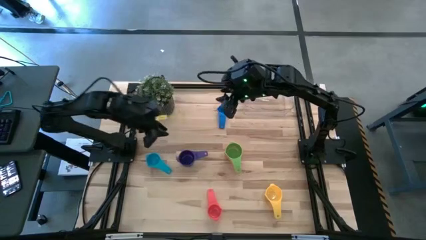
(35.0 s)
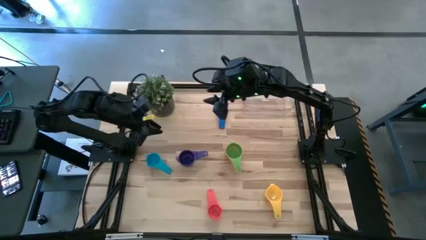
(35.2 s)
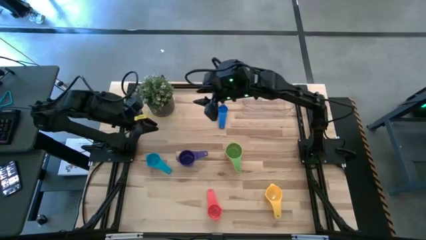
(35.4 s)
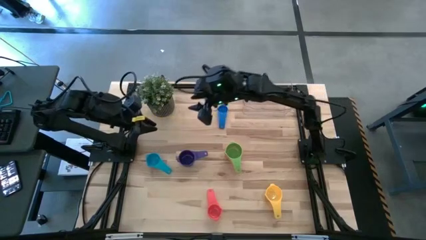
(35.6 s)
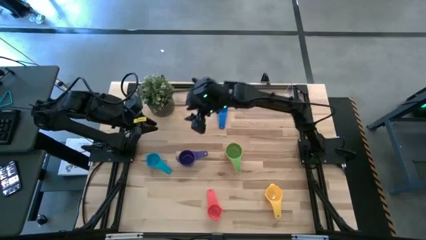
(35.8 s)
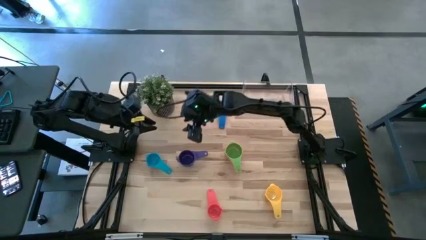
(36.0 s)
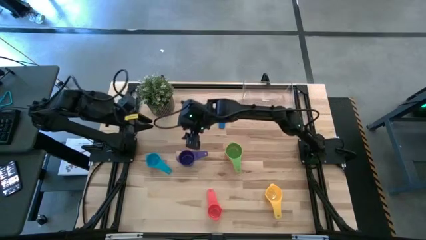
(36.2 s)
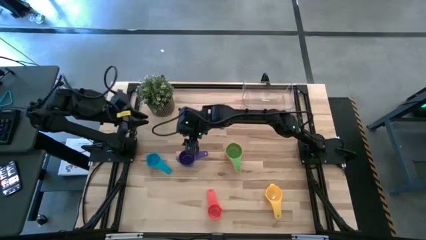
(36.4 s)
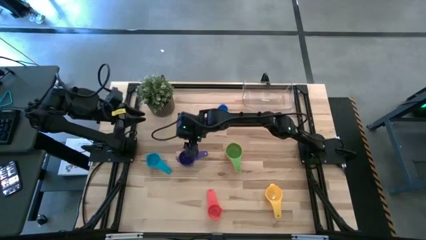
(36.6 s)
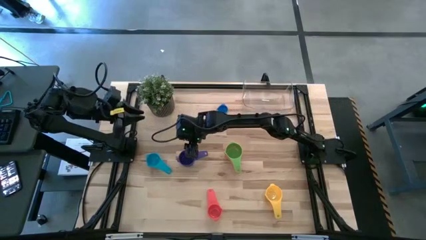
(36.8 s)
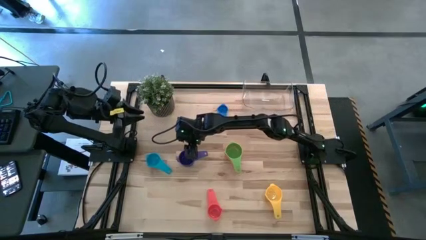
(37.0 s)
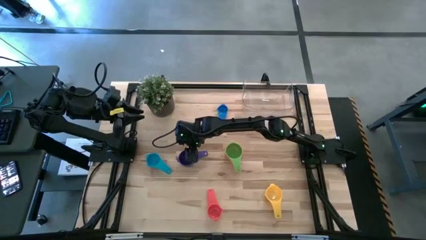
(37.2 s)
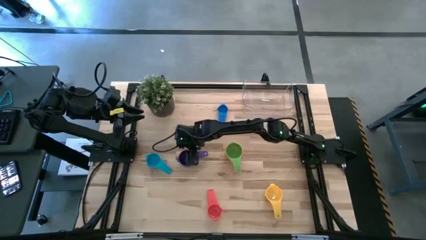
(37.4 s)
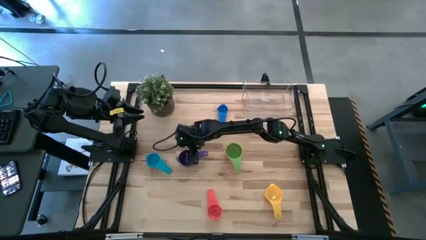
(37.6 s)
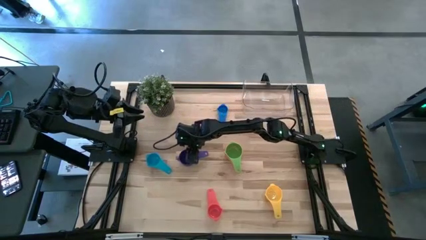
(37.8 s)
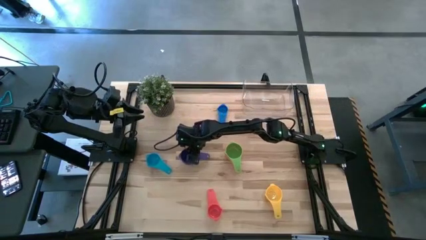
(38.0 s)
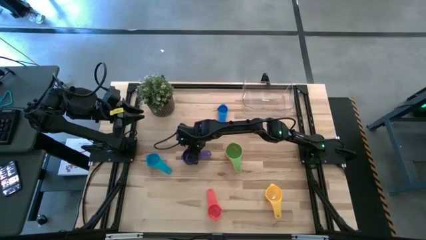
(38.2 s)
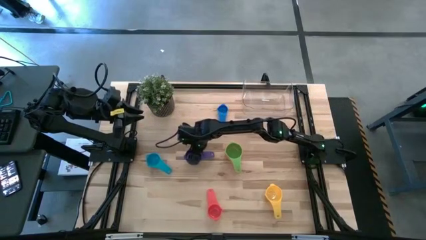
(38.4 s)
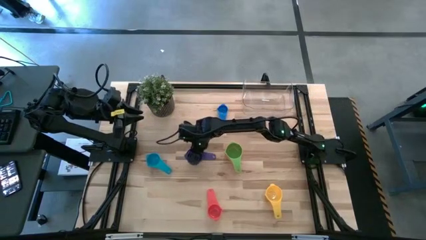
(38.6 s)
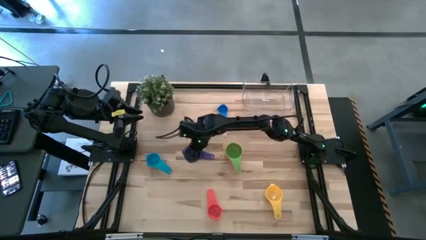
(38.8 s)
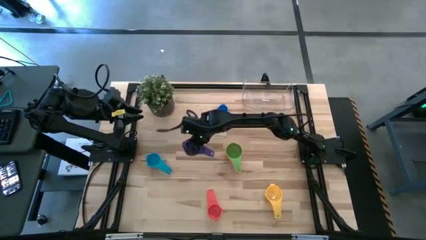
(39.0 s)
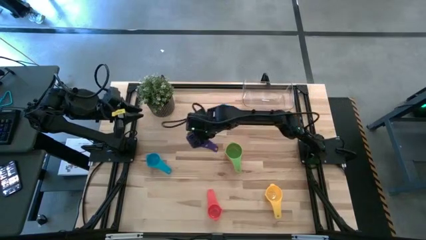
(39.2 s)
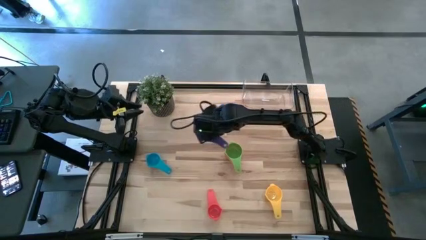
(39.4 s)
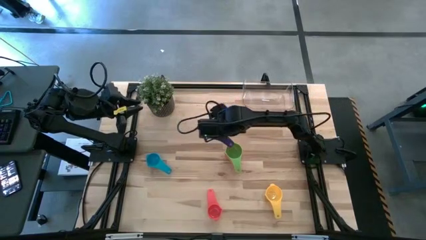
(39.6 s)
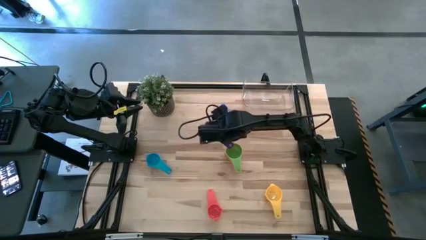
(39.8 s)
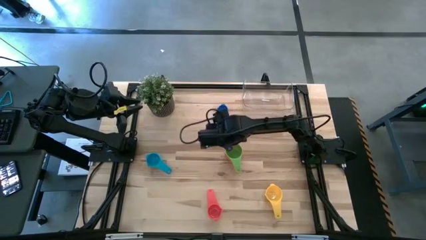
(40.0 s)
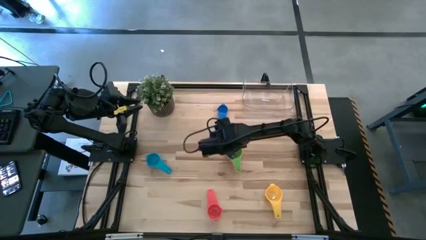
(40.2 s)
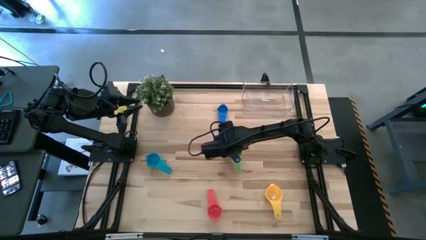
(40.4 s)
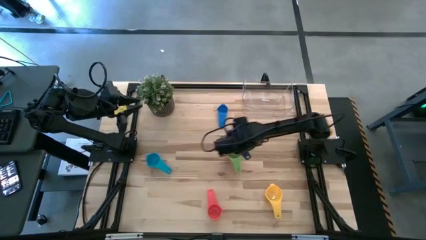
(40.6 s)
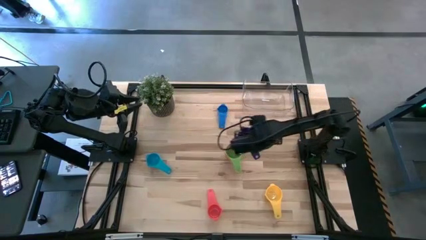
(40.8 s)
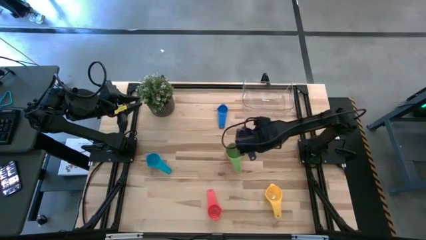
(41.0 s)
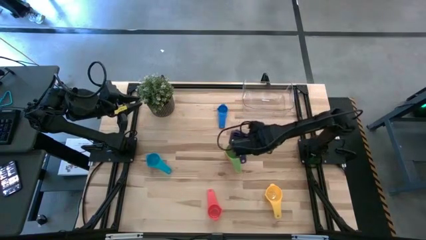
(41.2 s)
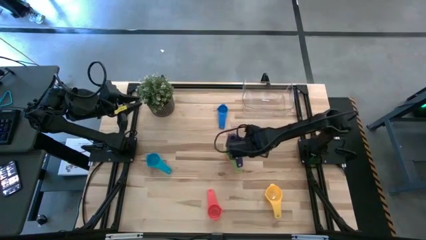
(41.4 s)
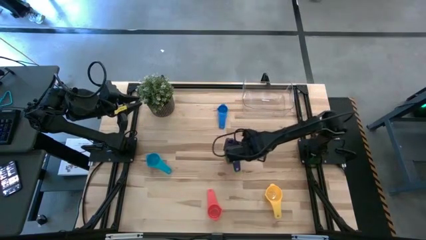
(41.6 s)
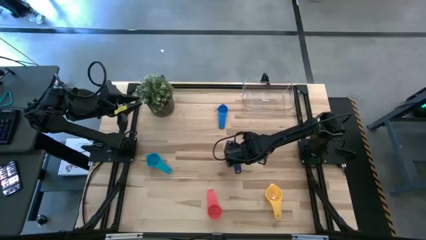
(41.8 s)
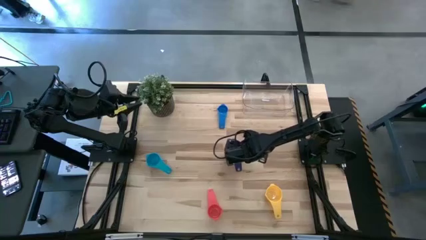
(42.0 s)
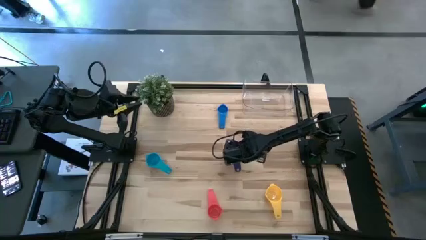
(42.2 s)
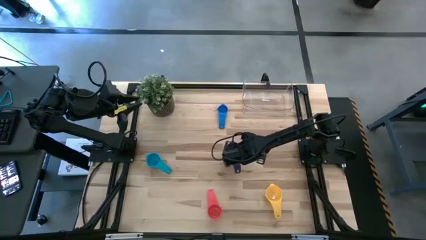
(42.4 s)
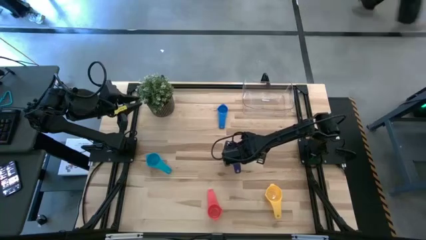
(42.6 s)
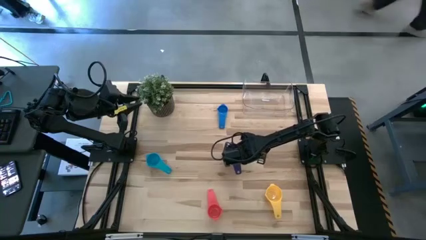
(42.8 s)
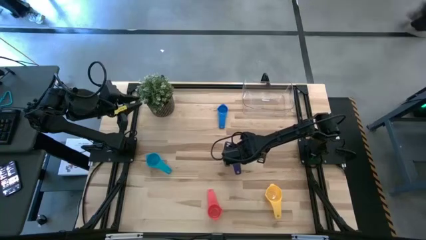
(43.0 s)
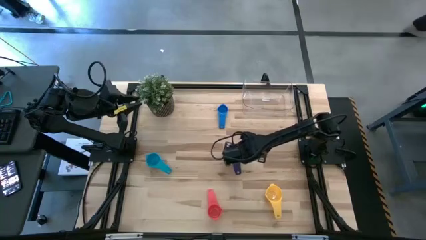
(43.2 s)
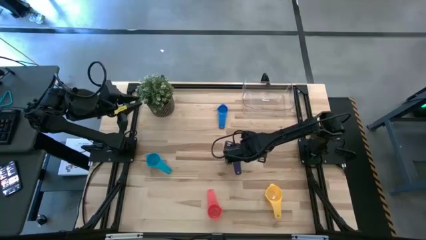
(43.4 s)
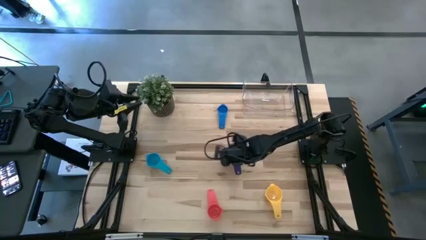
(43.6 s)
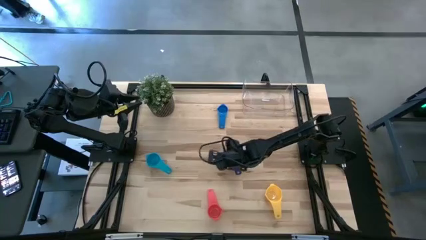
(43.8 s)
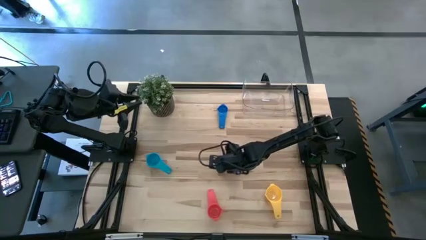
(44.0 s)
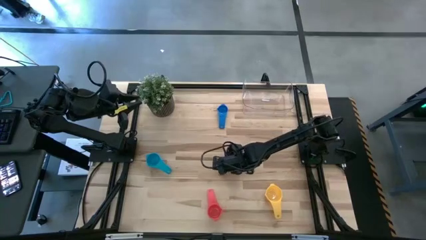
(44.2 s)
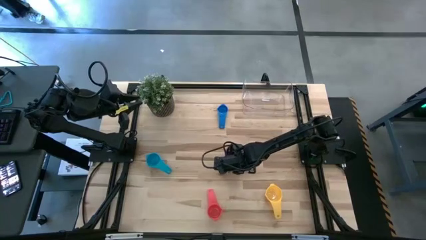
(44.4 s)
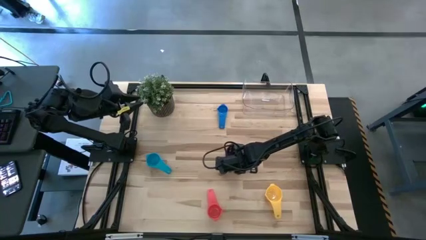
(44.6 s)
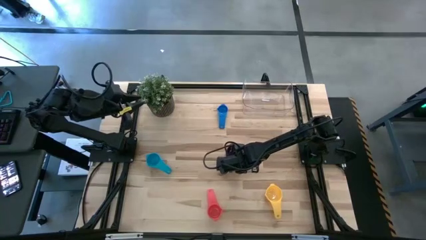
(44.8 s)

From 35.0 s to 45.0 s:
Task: Nest measuring cups in basket
Stack the dark blue measuring cup on top of the green measuring cup

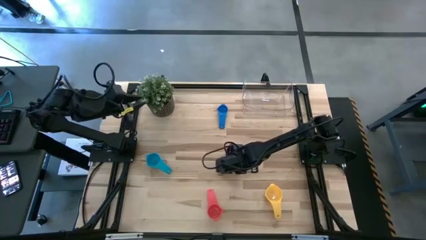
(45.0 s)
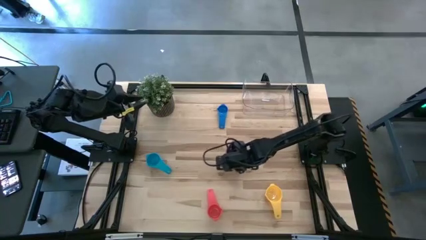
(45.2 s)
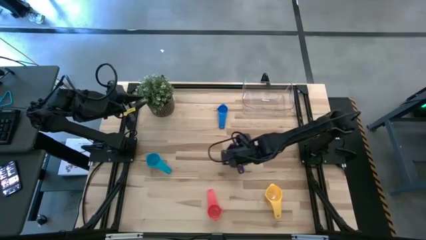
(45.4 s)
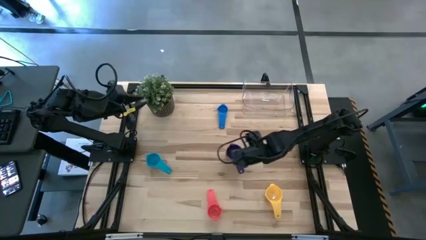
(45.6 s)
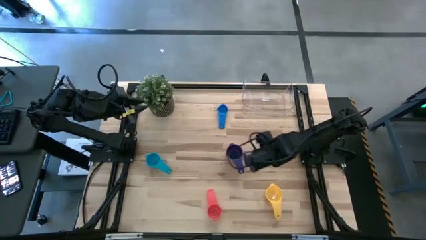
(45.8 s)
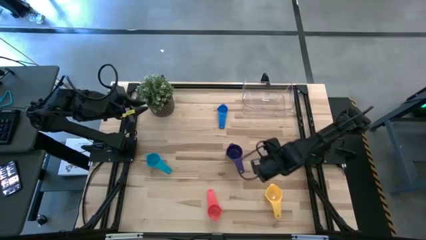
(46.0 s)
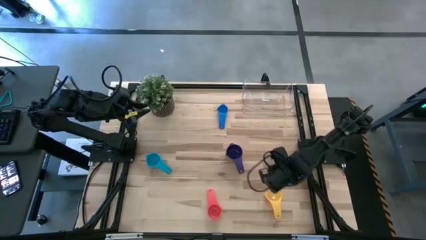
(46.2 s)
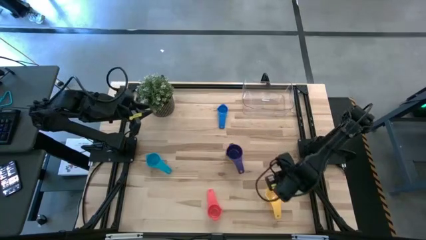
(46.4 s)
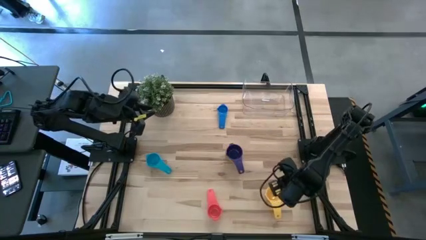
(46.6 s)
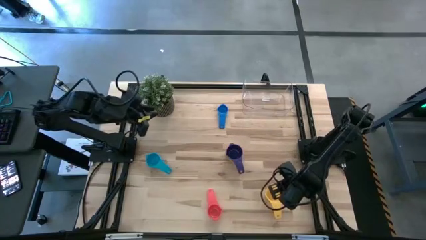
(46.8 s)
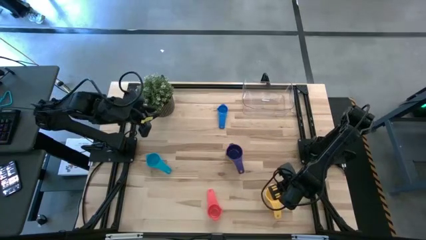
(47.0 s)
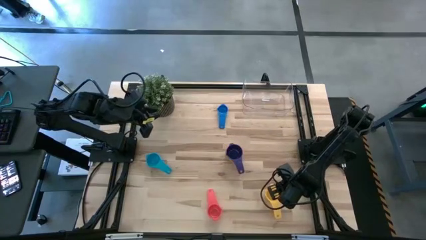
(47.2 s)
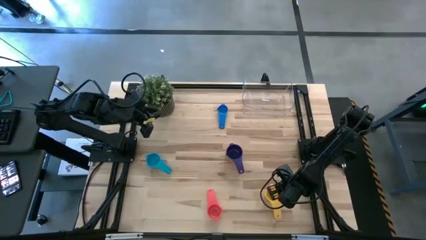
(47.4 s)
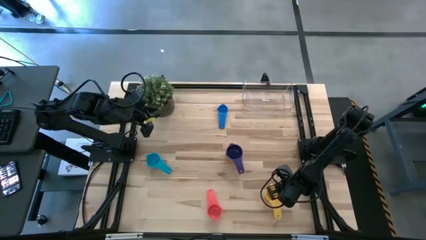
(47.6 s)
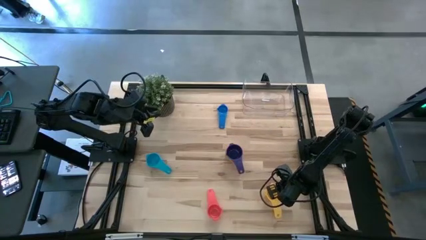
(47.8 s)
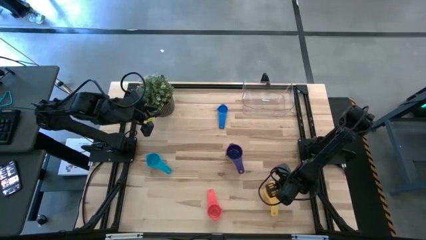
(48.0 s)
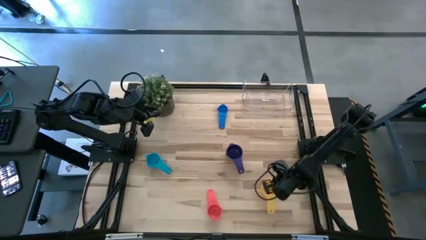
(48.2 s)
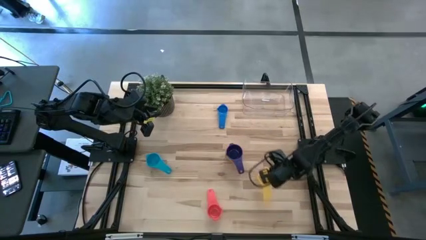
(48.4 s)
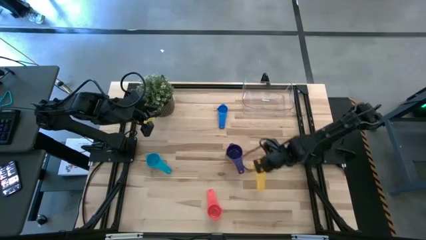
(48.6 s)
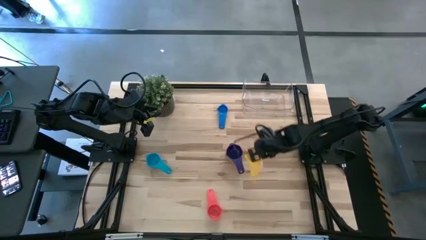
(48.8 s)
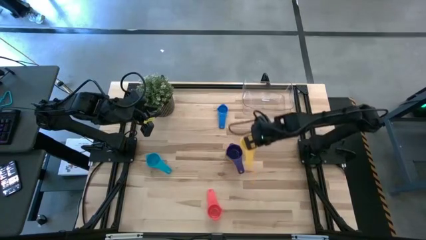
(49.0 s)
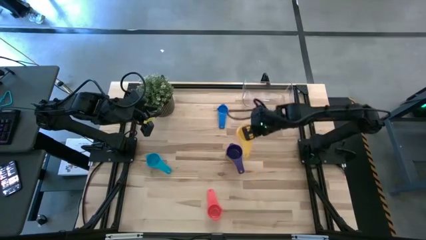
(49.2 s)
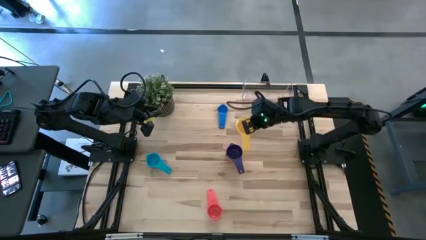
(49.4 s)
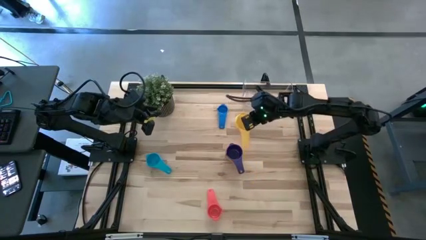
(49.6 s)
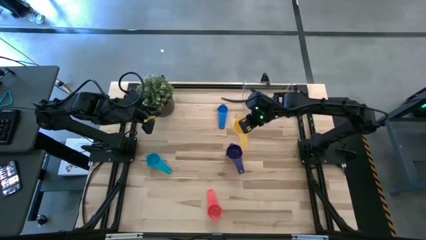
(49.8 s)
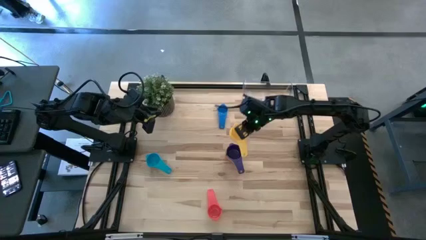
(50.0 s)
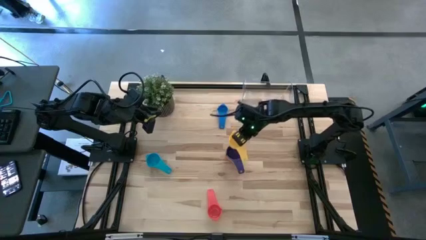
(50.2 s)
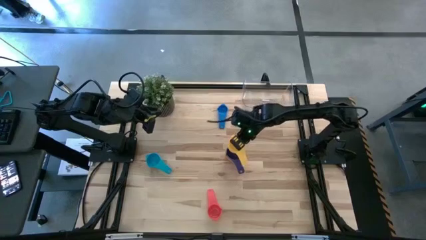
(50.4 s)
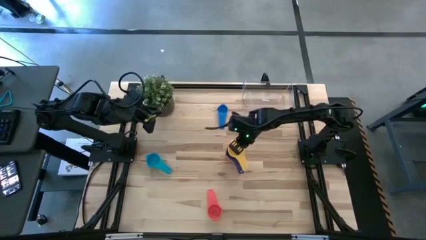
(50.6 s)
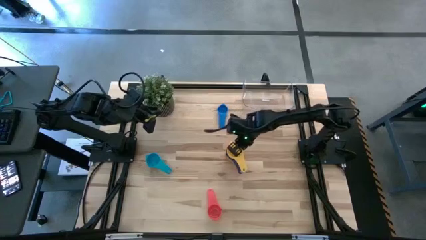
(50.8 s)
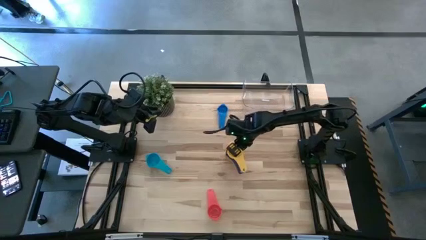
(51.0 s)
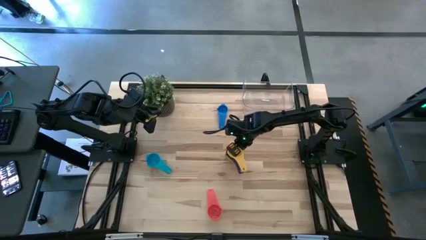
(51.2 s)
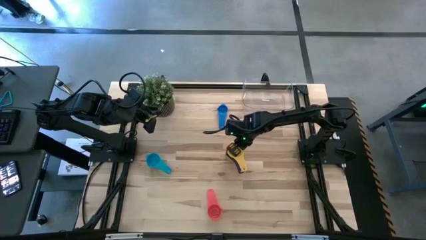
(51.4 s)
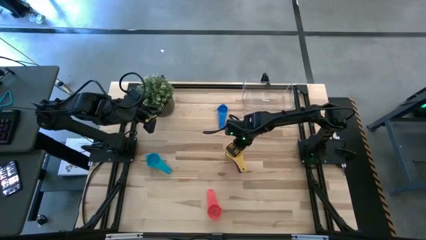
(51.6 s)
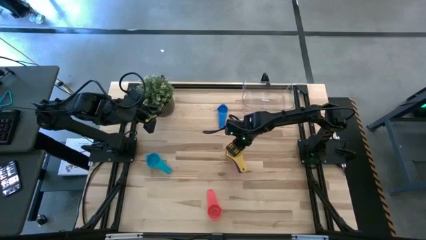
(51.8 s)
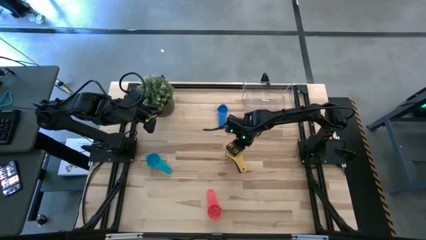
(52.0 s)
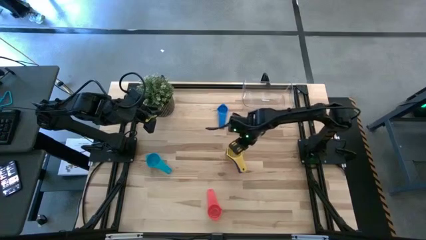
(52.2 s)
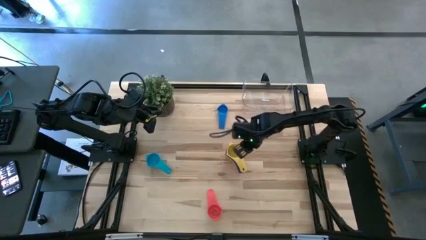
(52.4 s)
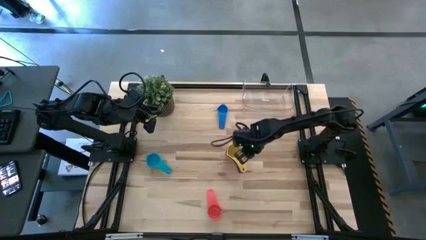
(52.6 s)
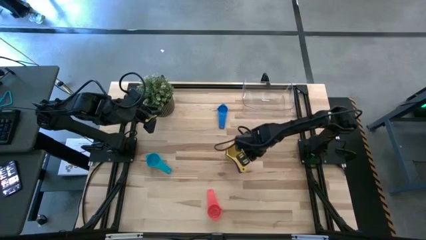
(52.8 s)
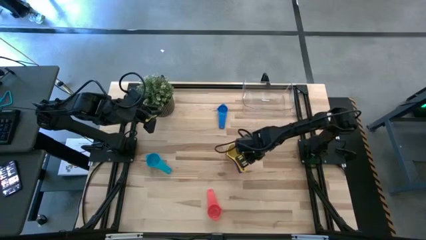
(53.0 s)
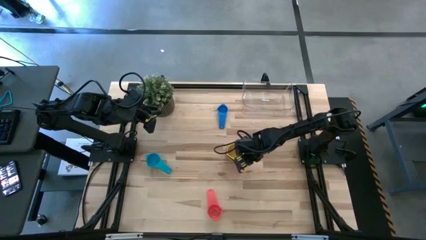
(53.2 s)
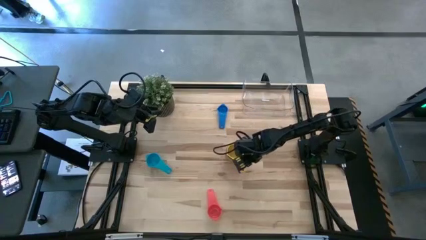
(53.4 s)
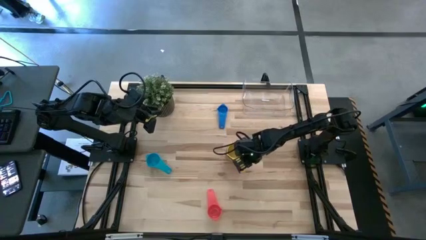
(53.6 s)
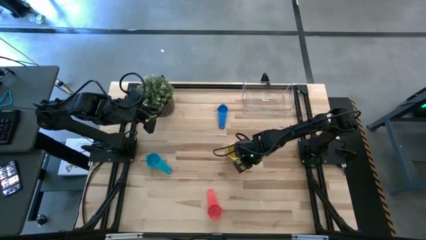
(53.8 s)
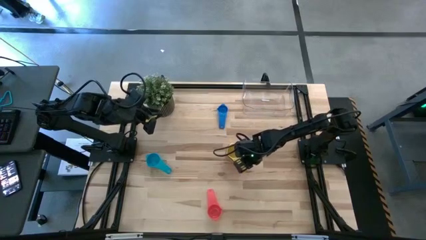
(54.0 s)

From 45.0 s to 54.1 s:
Stack the yellow measuring cup on top of the dark blue measuring cup
